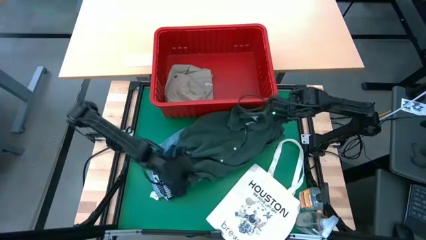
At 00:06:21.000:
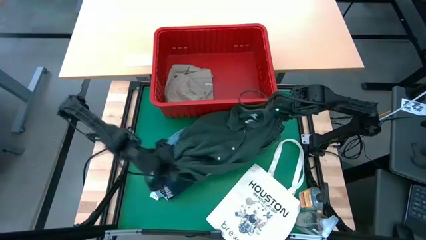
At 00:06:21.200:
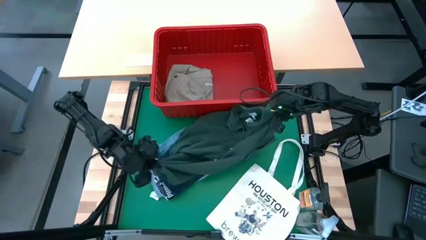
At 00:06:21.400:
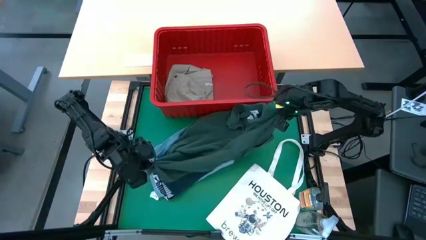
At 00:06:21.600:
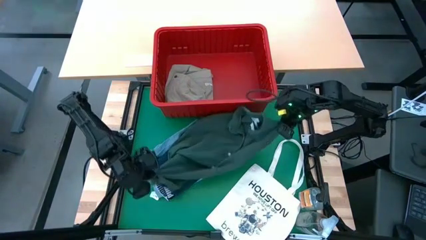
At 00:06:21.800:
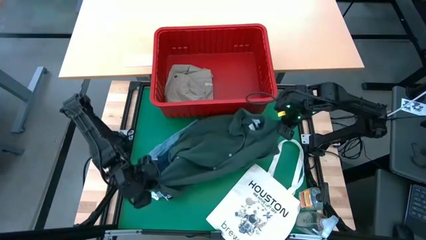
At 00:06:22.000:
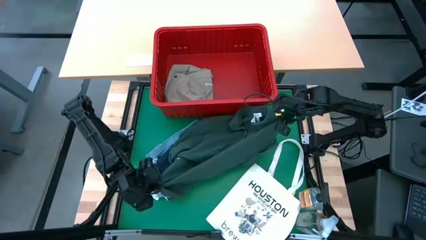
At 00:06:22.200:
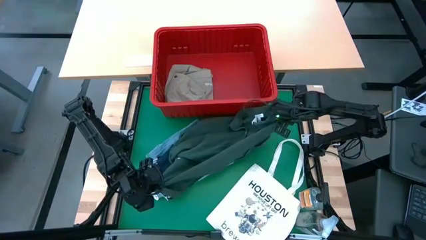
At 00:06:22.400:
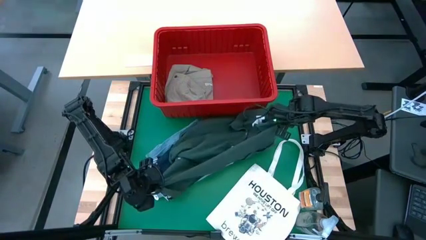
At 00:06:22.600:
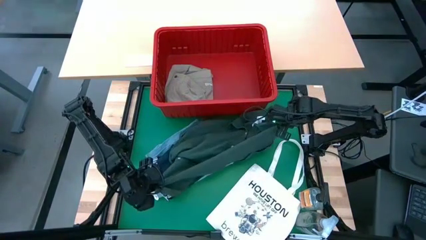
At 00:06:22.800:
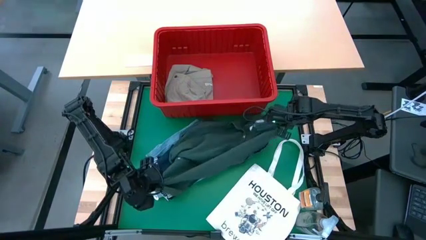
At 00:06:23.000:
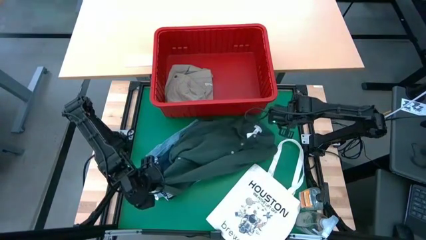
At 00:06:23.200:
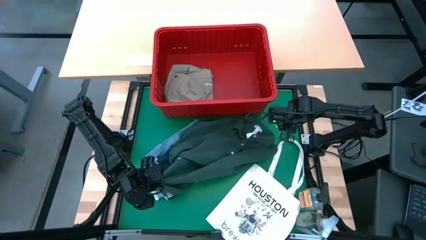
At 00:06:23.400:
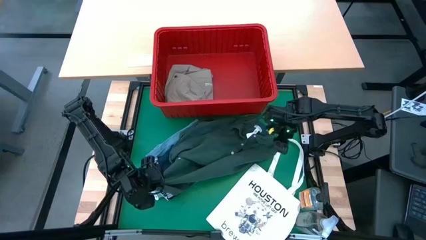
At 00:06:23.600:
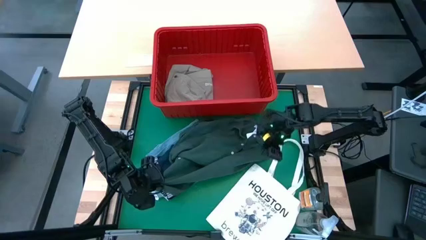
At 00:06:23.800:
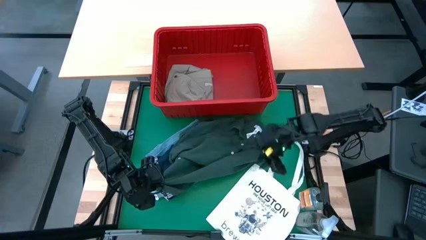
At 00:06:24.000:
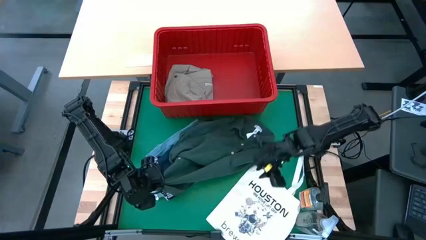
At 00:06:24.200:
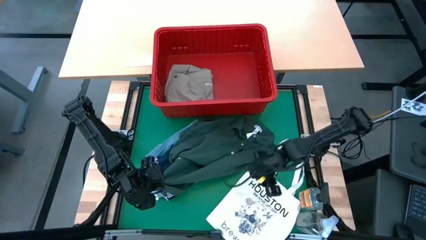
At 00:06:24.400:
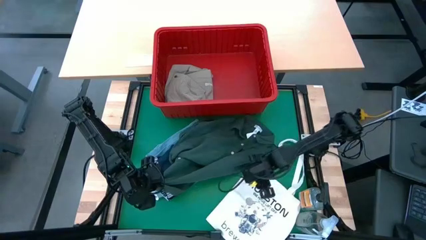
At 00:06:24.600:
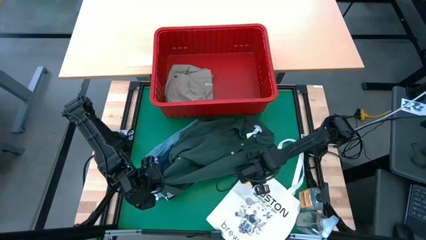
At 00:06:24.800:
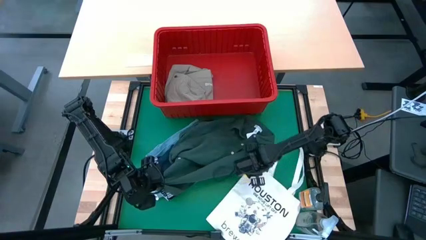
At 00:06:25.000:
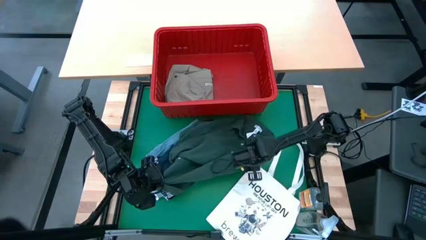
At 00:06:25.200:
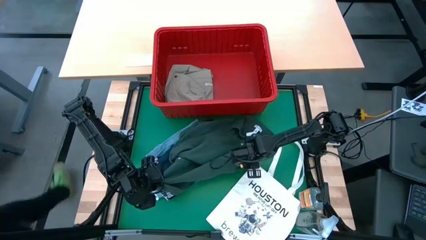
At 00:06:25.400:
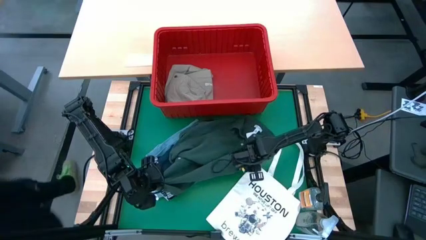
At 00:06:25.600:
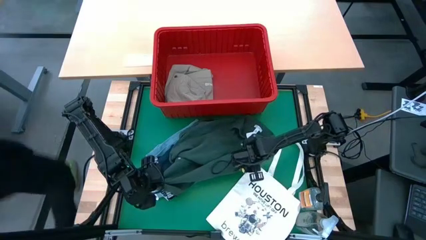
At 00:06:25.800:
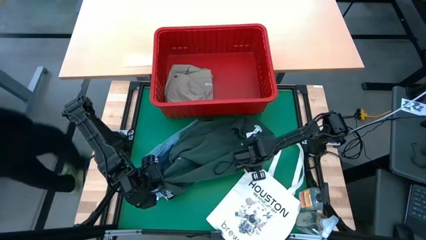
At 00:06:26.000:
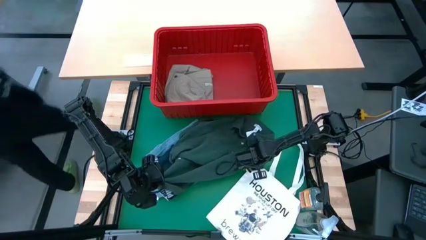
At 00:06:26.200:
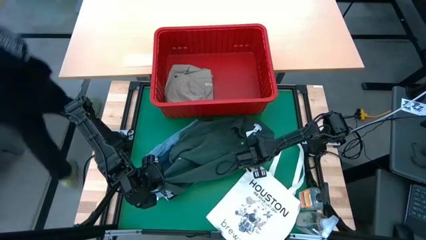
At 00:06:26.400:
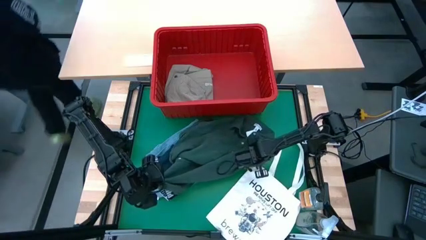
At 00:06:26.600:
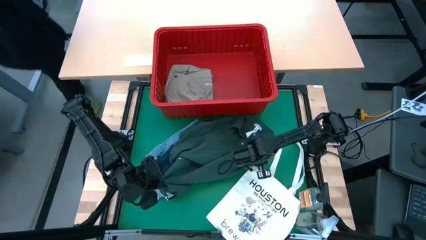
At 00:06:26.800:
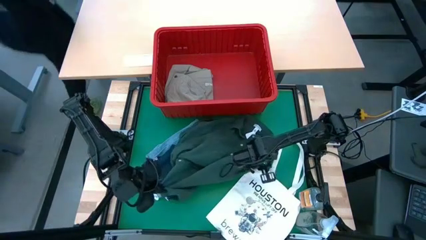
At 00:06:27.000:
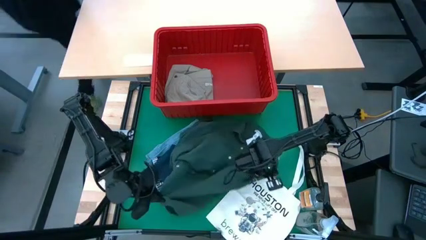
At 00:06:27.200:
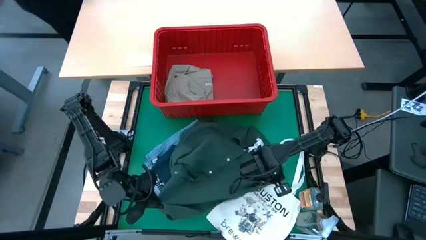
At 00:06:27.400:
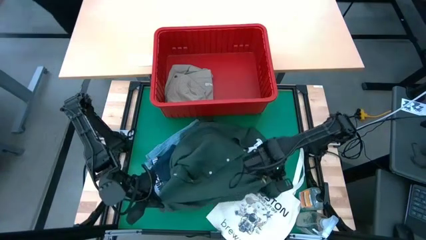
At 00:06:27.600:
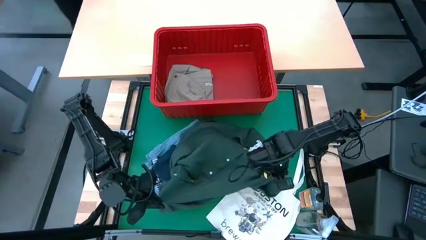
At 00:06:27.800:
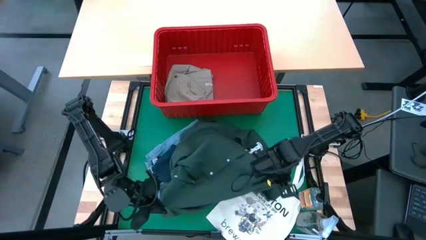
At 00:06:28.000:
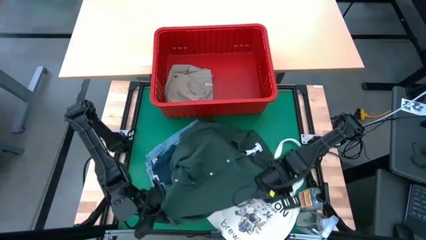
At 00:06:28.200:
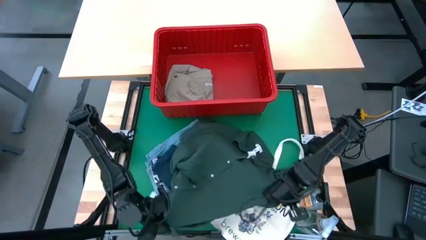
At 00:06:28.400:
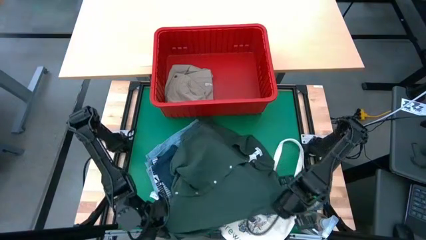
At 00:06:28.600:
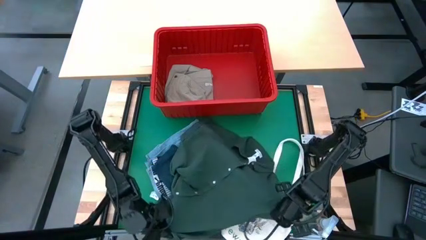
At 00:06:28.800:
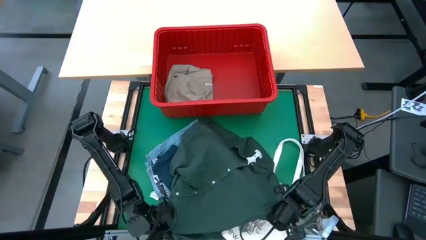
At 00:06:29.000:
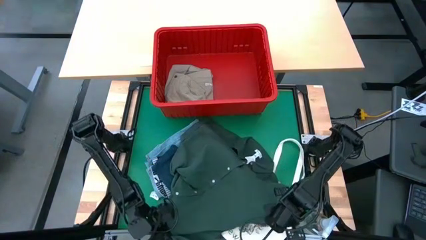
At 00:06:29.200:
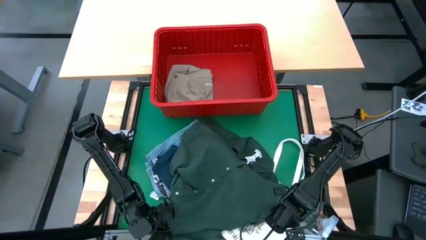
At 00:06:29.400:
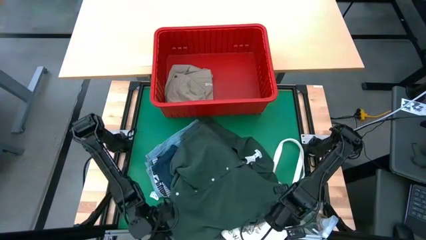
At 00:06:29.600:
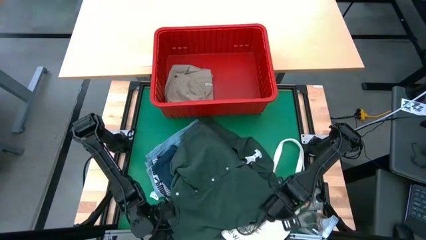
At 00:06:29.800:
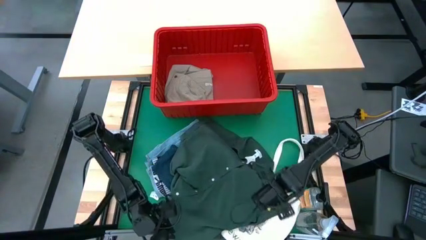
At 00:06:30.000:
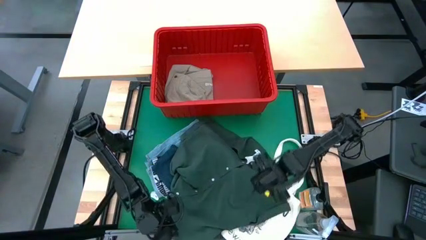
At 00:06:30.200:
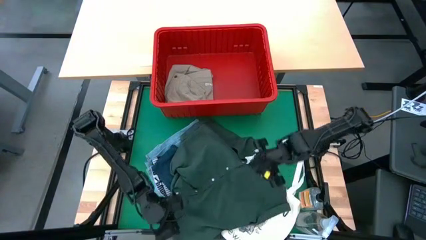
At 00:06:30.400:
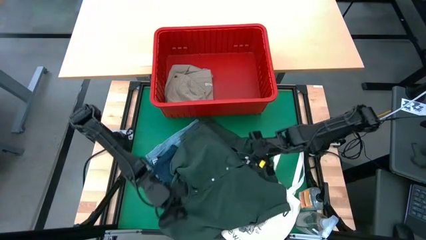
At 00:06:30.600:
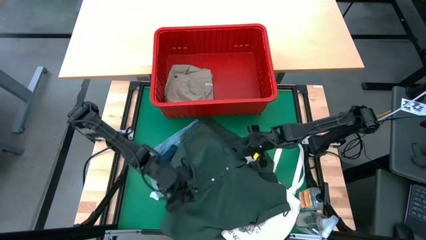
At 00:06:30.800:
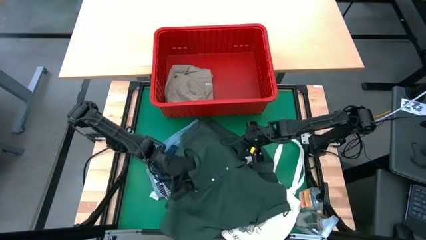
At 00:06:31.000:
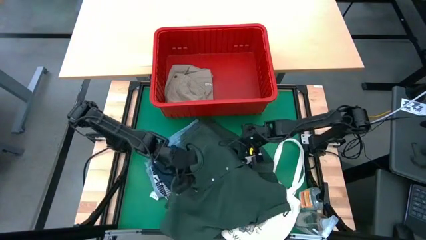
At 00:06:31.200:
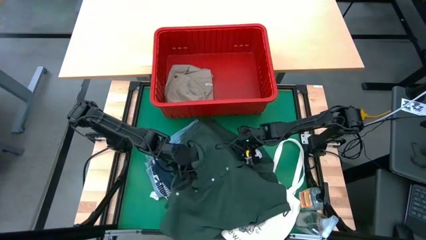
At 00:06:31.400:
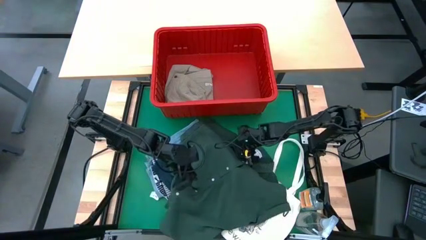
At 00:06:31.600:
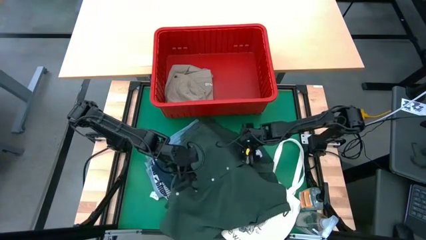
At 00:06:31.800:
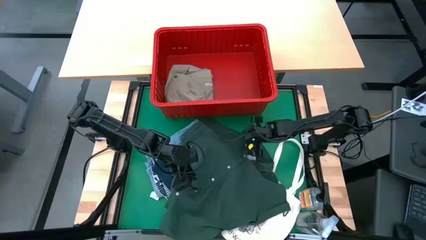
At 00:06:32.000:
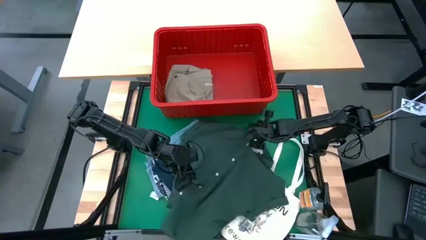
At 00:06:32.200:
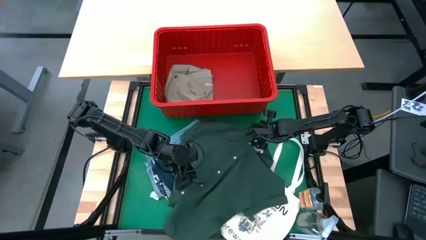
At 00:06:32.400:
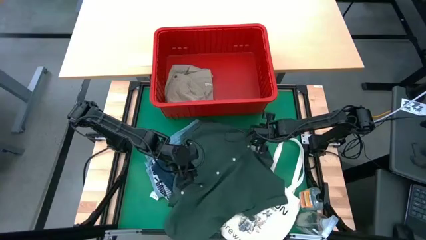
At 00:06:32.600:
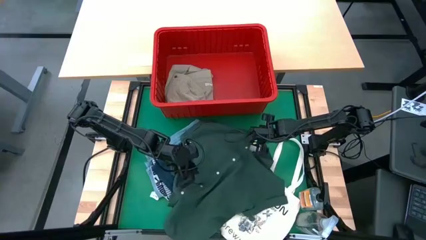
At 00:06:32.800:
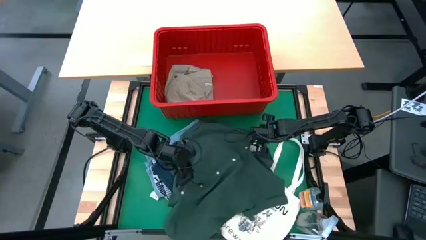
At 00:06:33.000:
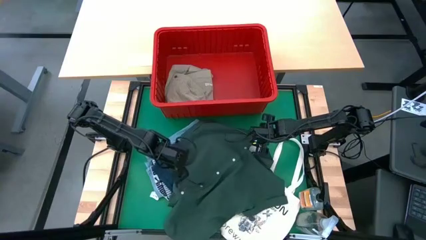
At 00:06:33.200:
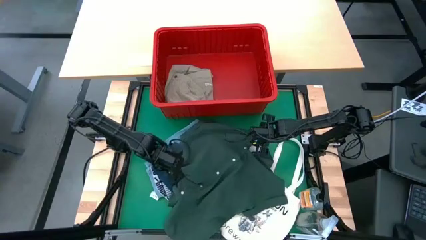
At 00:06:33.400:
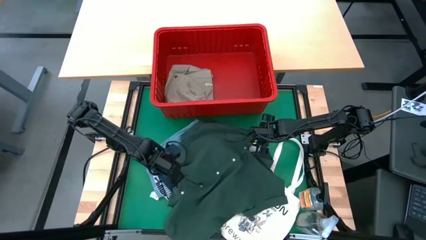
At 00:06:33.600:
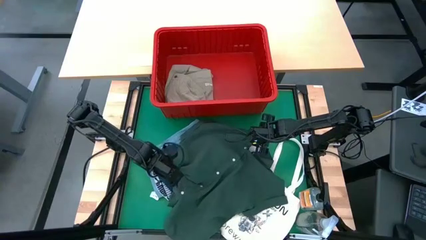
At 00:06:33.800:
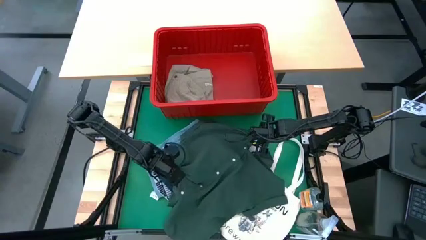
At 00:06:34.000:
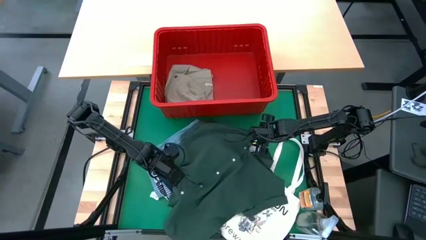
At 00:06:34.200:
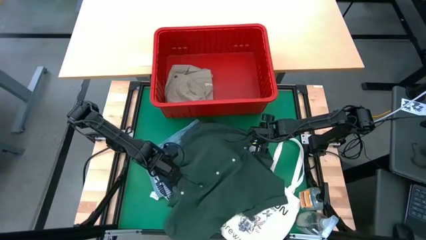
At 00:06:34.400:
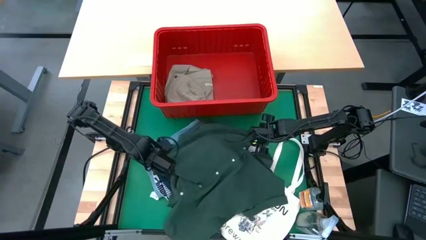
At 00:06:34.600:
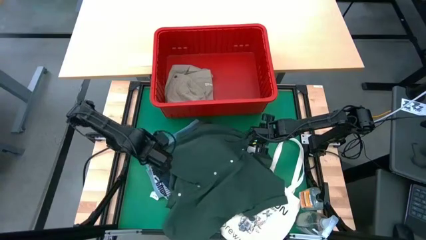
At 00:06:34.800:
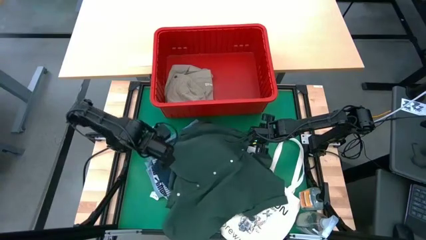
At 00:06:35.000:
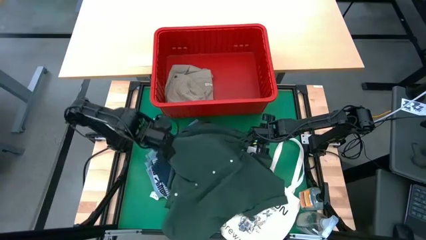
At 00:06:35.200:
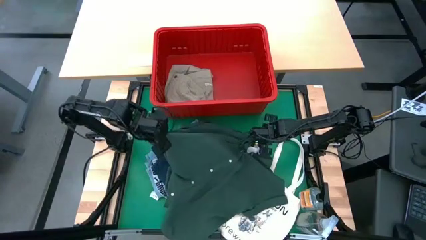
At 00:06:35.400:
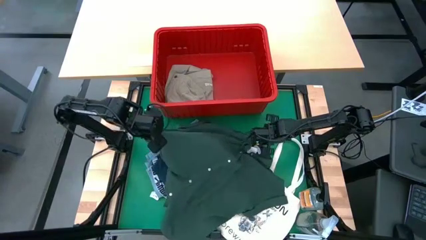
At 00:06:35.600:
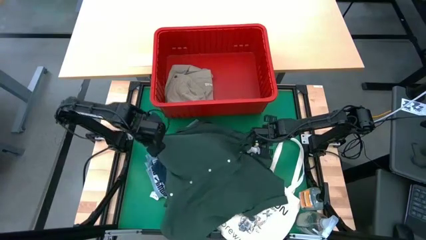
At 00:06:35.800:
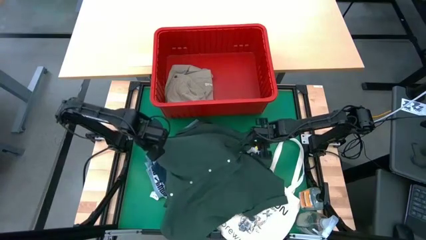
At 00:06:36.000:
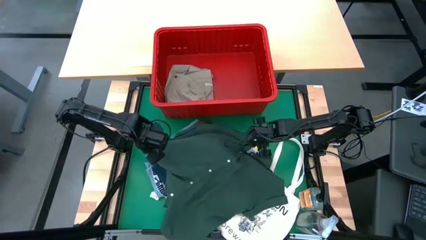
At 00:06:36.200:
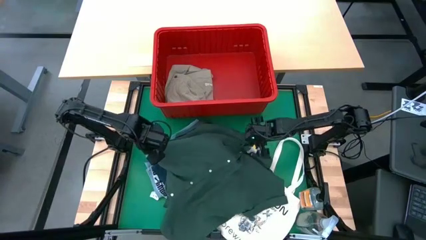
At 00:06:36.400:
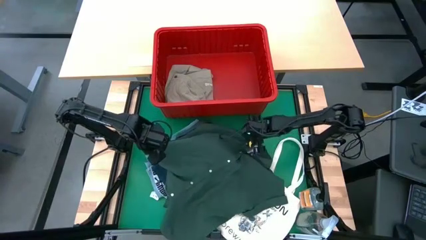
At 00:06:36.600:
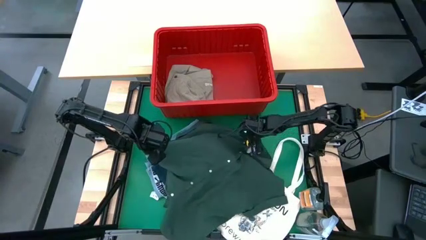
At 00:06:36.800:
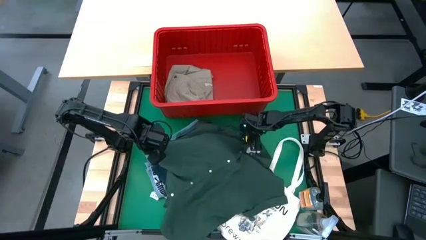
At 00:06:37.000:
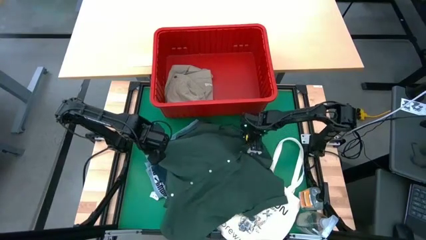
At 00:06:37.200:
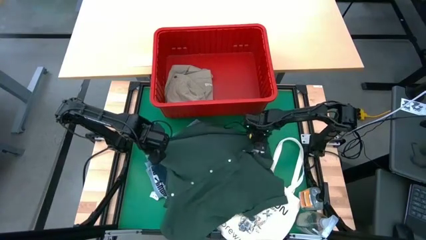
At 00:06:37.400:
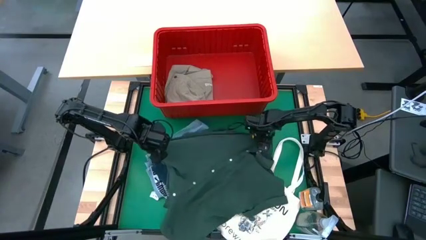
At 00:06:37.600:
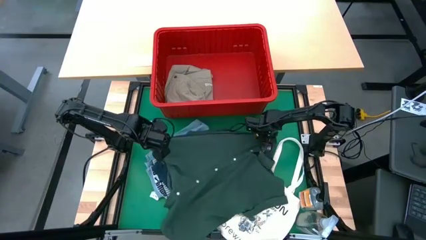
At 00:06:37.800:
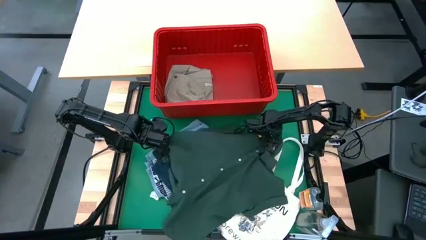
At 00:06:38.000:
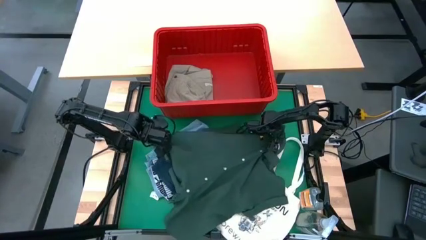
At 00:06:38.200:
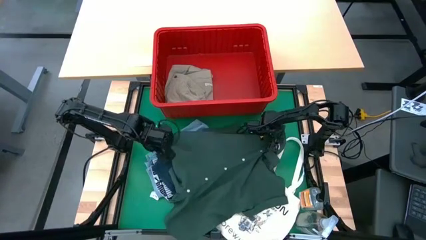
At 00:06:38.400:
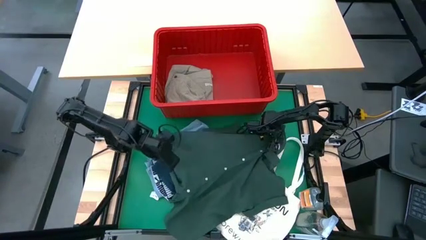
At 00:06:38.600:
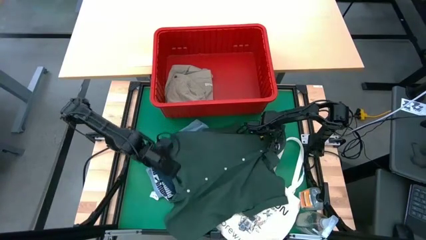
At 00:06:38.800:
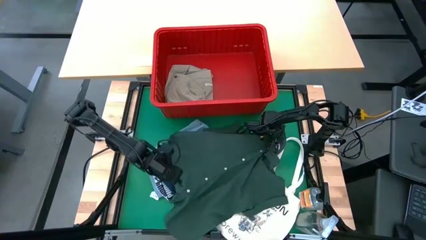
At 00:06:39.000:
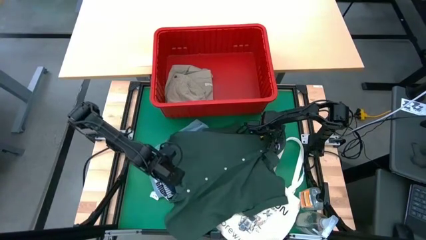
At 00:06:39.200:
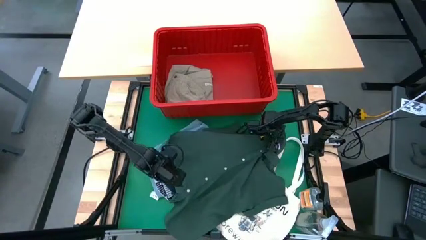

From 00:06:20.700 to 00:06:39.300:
Task: Fold Laundry from Bin
Fold the dark green polo shirt
